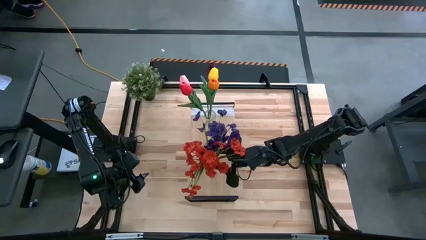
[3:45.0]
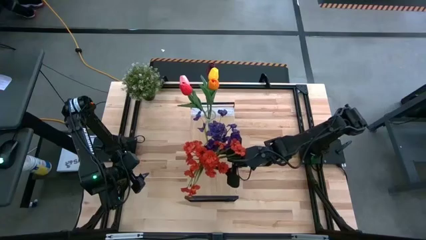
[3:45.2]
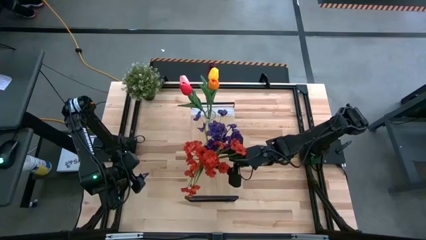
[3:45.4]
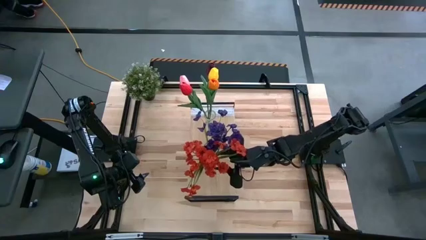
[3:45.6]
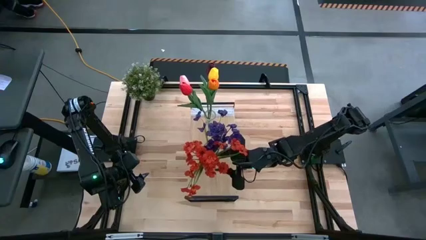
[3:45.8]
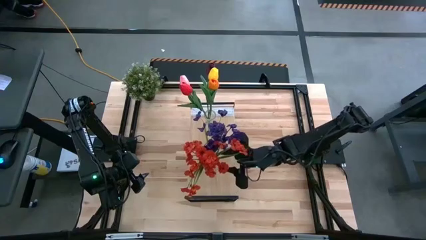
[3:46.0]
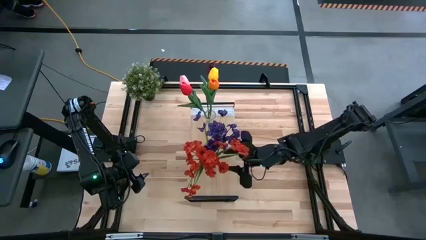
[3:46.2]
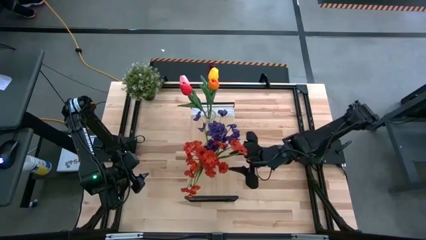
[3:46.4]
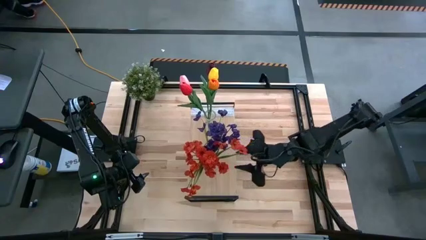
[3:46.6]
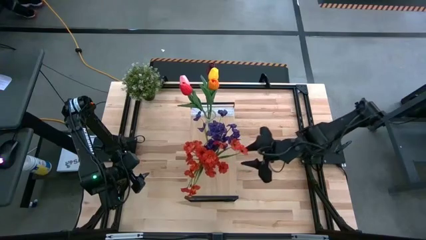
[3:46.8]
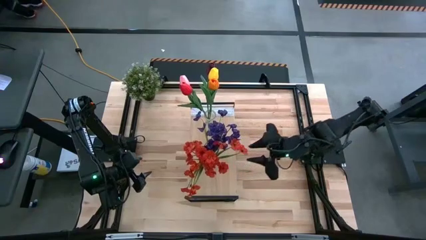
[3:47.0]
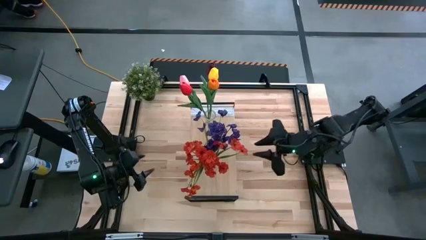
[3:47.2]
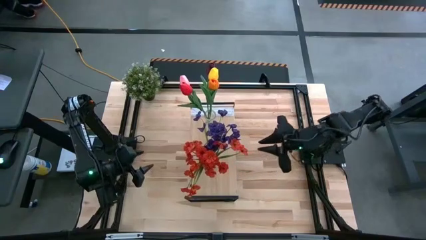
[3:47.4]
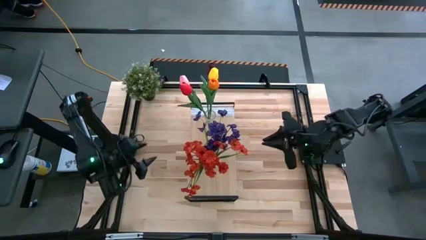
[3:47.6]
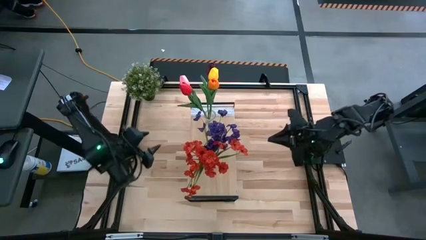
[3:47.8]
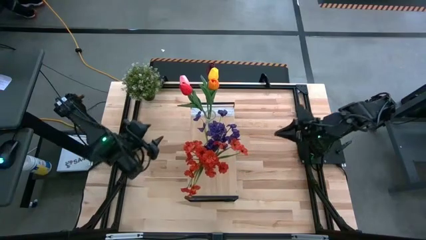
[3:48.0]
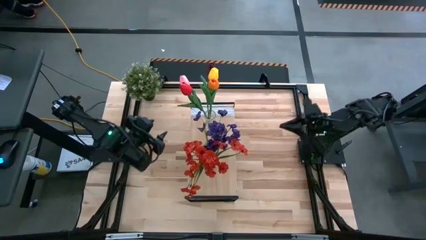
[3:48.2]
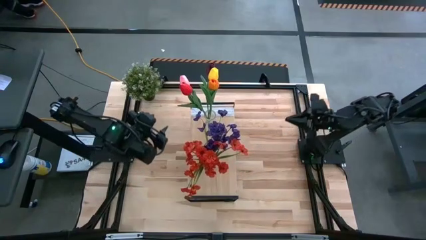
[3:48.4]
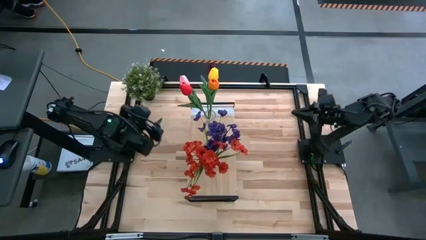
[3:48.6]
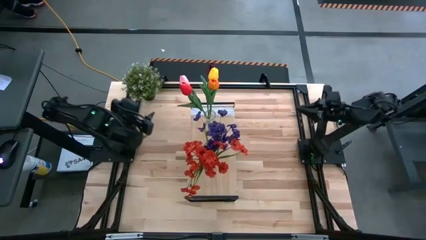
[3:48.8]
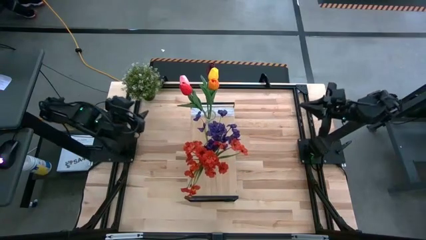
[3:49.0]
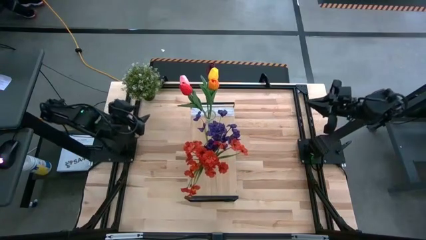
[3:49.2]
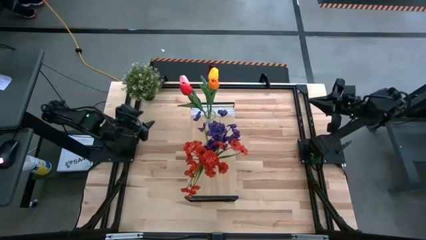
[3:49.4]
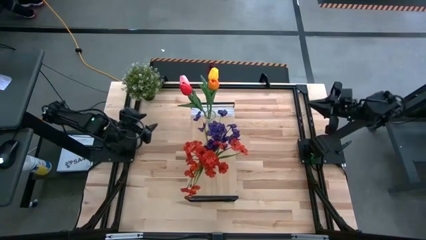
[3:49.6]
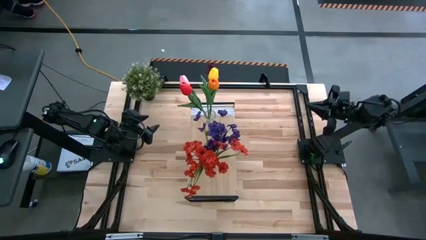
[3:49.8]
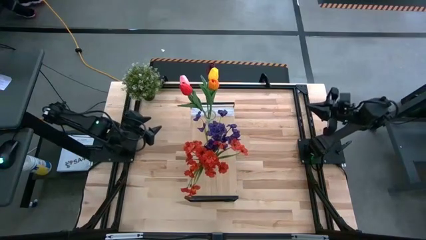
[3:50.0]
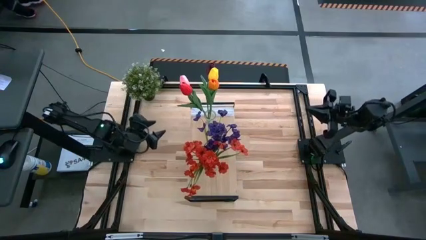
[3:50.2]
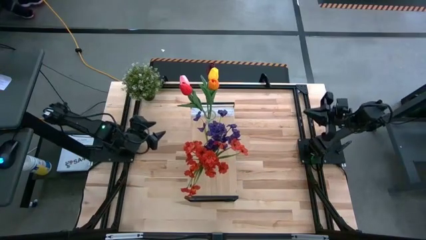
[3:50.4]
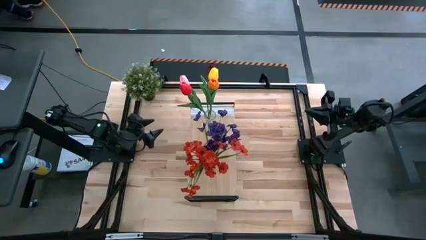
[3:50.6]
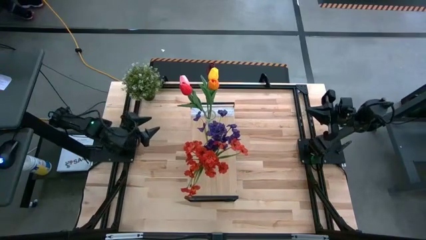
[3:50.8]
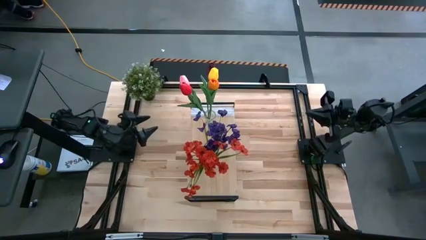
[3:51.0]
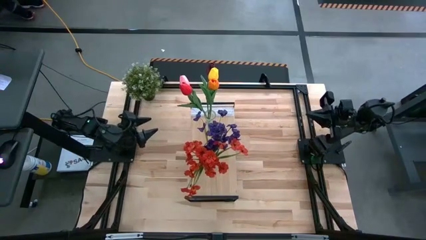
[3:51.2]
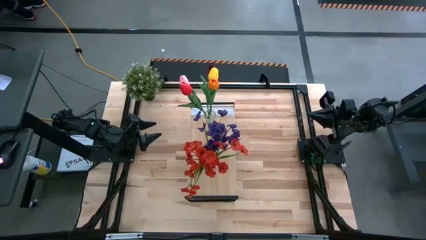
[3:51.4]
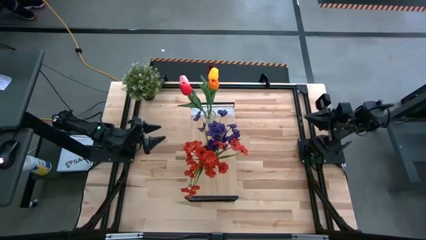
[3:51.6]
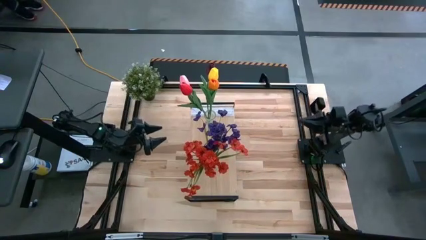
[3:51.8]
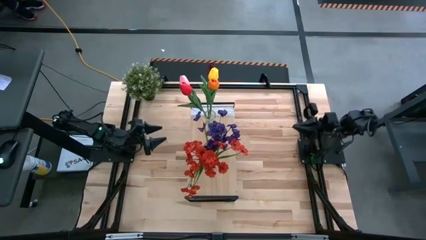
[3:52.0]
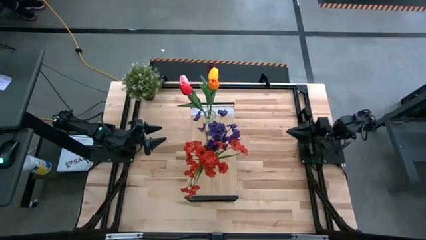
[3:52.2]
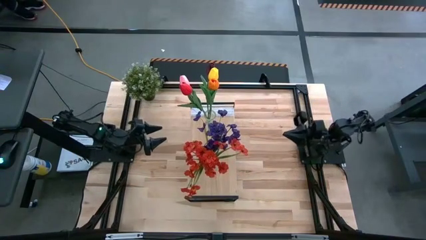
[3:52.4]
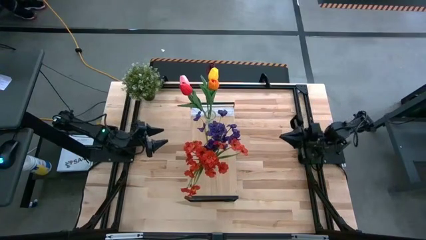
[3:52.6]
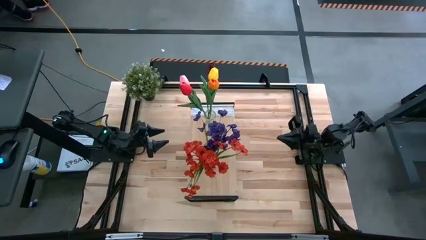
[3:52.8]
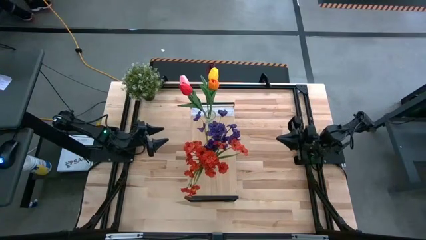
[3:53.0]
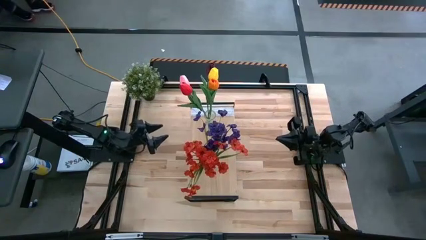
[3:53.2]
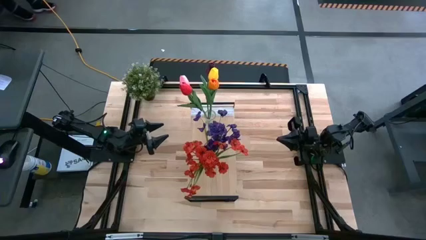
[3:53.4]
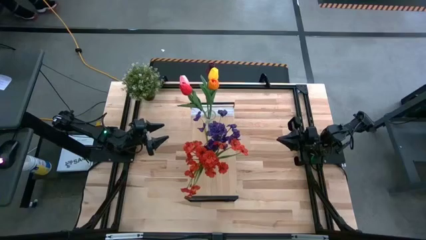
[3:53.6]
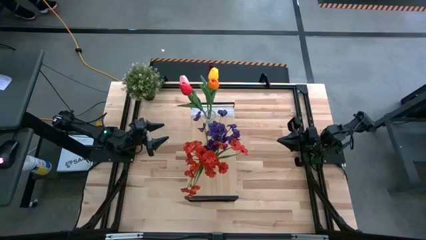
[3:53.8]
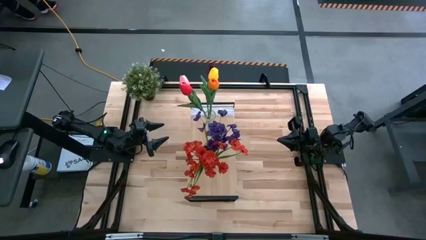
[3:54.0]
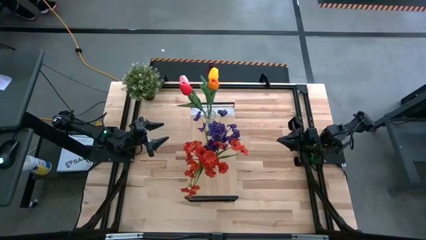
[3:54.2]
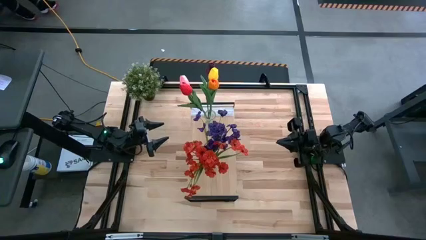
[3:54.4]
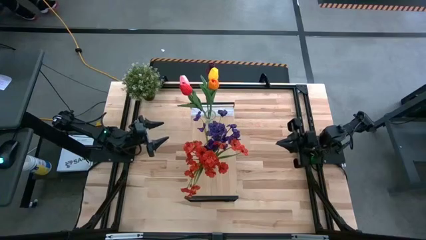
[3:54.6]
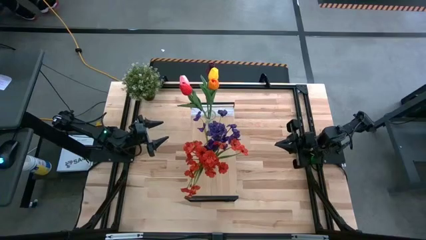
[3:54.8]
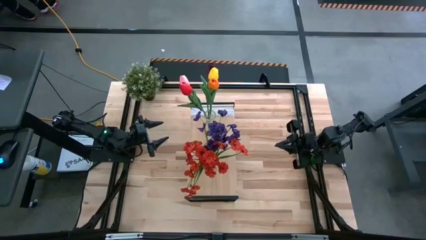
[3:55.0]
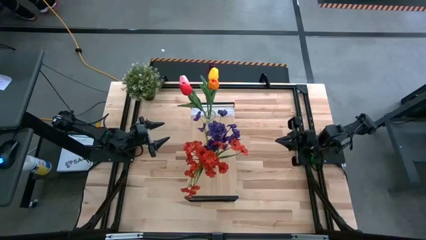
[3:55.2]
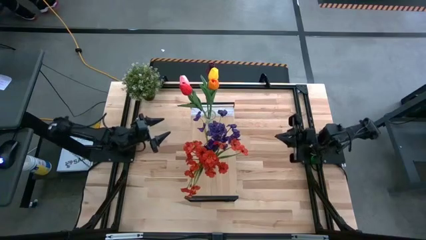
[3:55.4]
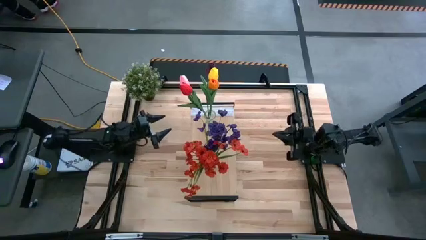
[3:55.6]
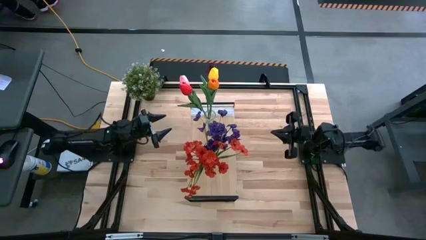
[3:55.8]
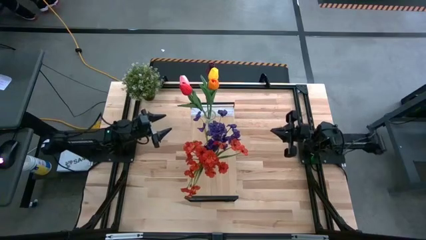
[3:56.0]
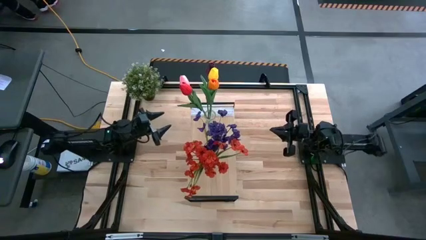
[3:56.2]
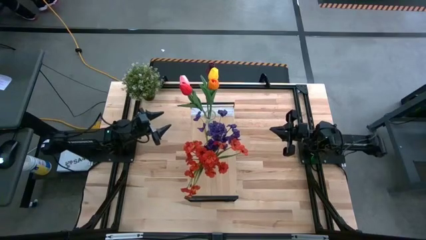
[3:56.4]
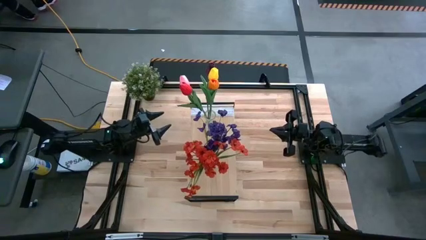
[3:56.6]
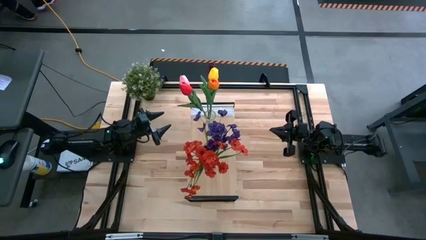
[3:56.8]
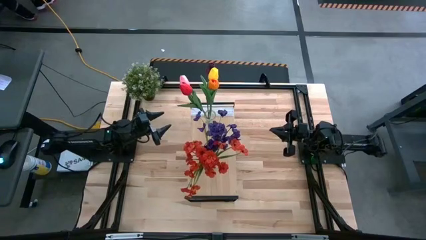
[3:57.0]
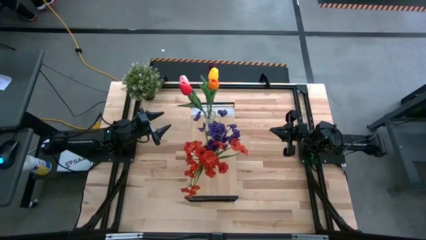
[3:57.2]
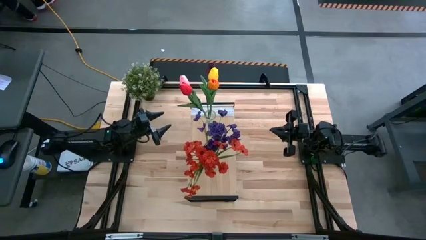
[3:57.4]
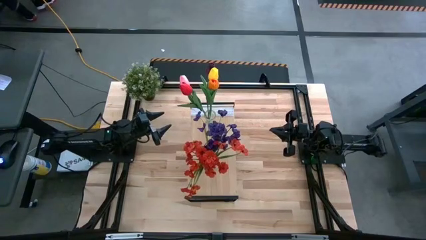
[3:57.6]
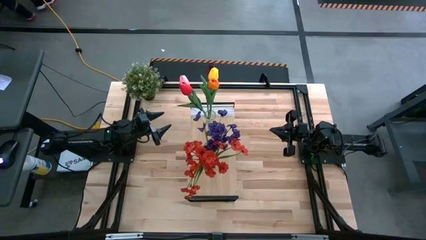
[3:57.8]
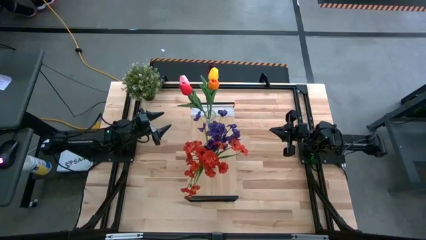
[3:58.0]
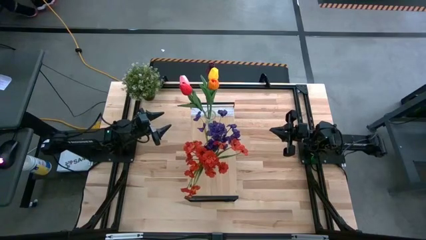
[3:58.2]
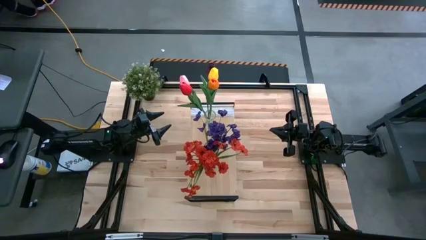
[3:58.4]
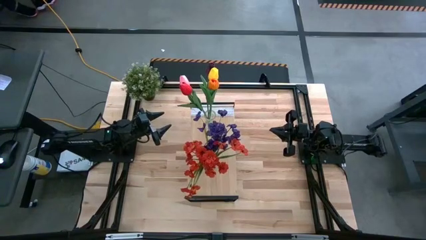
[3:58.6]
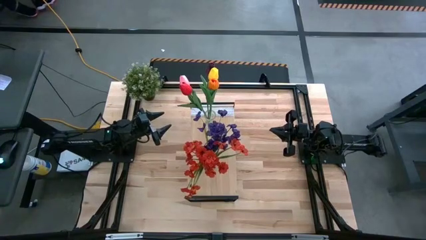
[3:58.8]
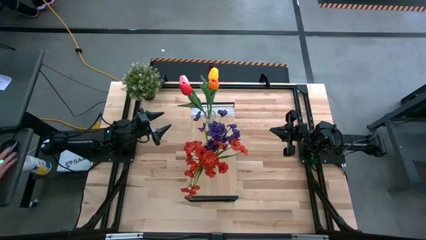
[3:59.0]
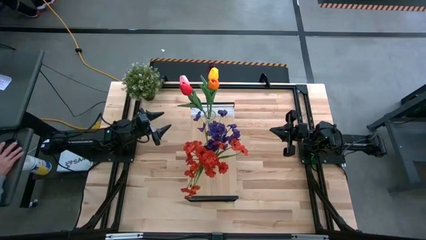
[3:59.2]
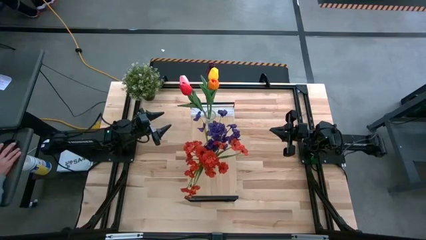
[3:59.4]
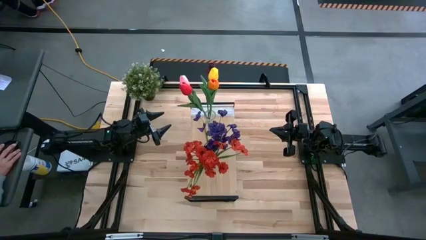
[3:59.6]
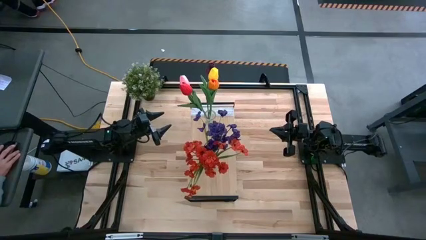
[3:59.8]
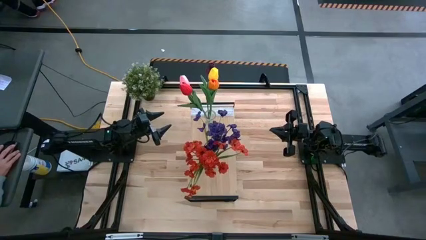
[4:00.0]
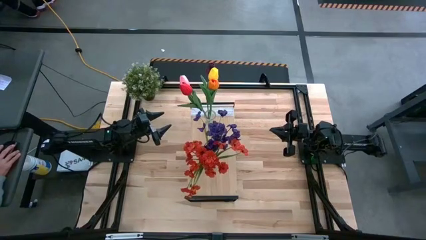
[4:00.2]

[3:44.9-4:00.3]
Task: Pick and place flowers into a vace then onto a shelf
Return to Home Position

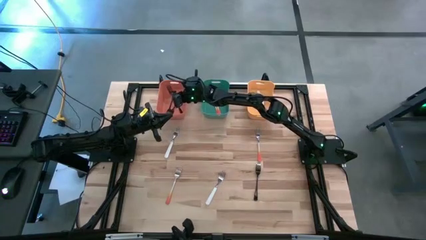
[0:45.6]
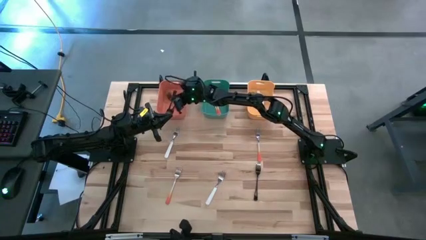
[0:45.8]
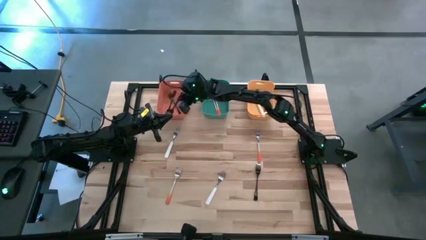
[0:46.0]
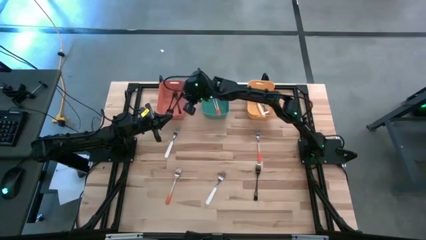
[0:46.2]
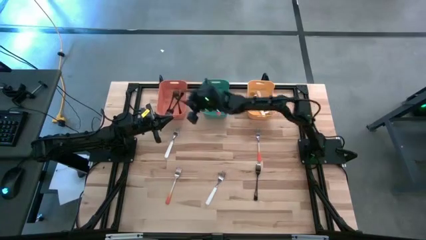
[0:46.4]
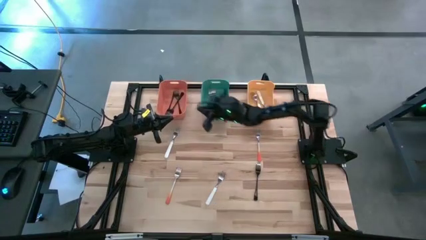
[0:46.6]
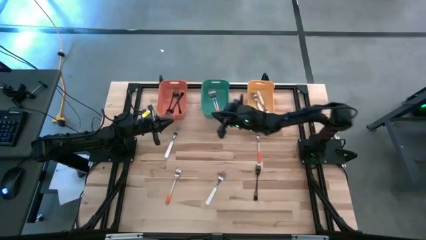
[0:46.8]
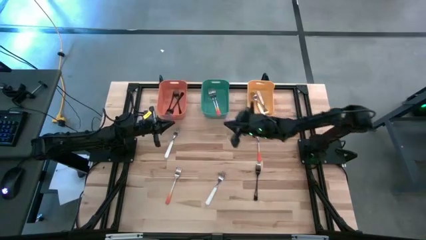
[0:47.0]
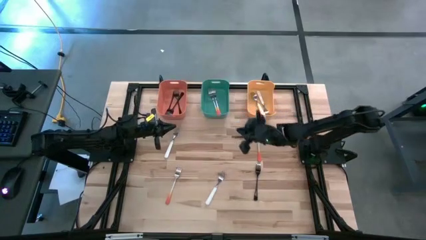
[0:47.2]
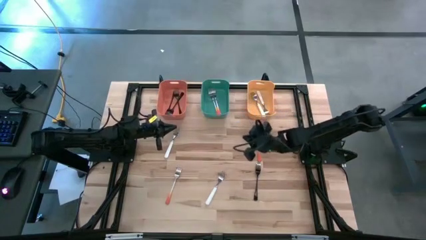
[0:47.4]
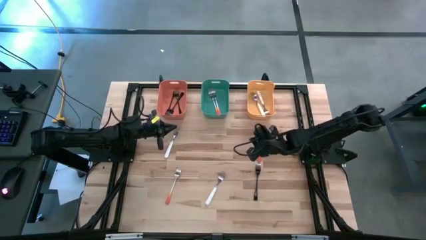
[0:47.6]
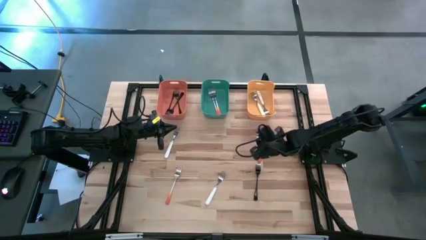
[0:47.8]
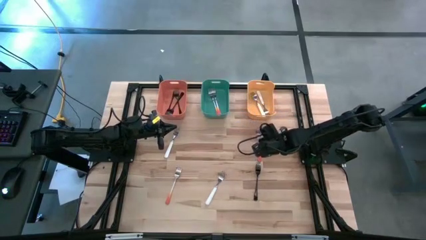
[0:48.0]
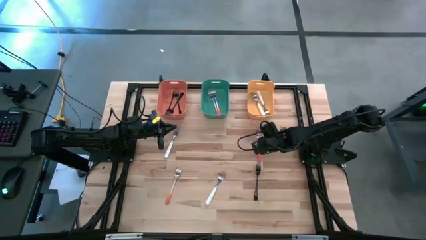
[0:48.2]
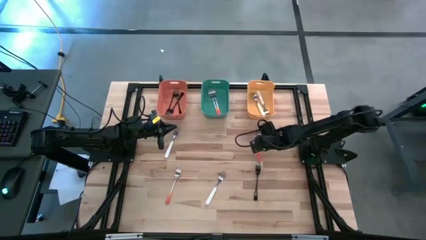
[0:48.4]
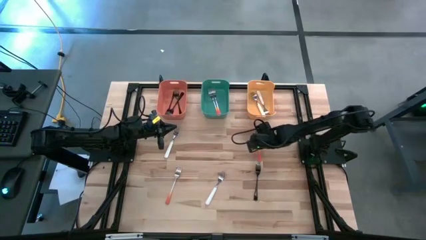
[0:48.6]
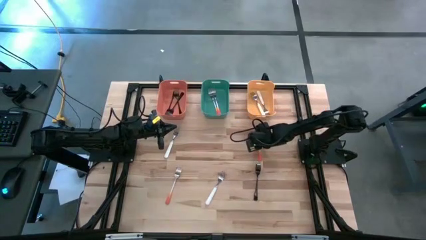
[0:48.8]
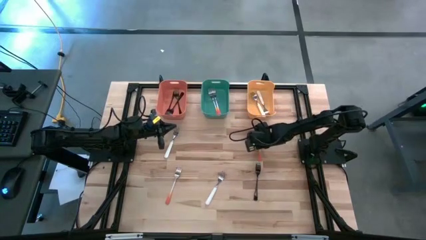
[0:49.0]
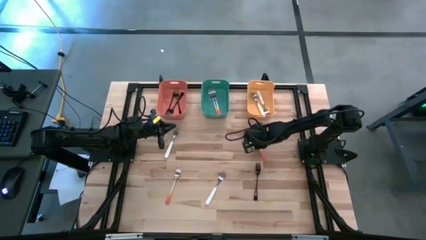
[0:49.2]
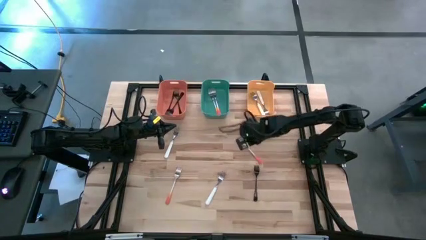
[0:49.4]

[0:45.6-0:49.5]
Task: Sort silverware by color (type)
Put the top orange fork into the green bin
